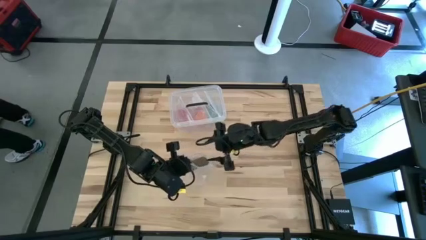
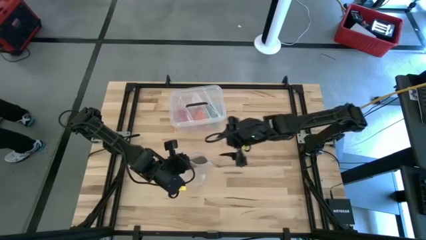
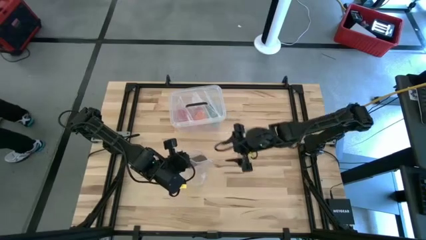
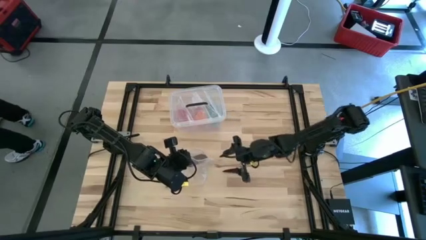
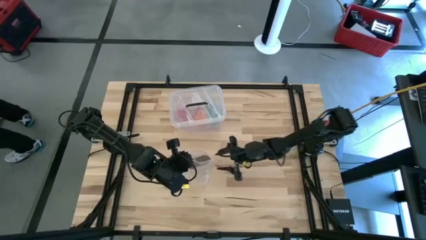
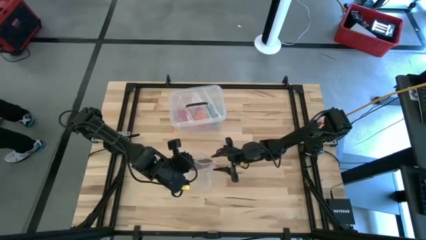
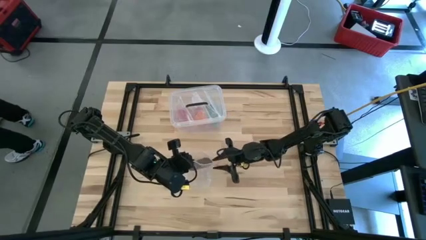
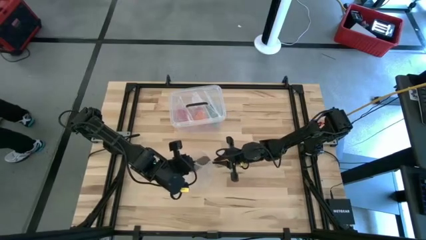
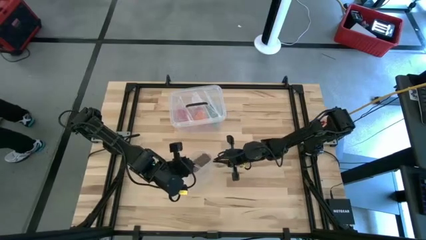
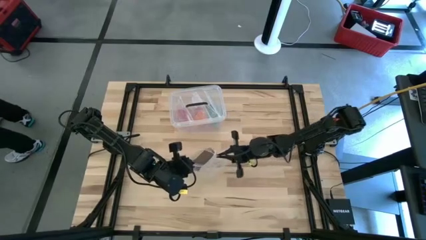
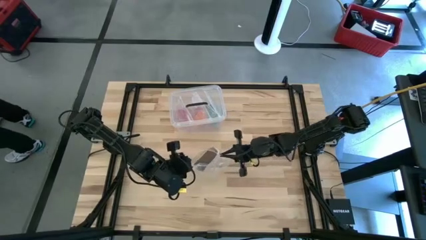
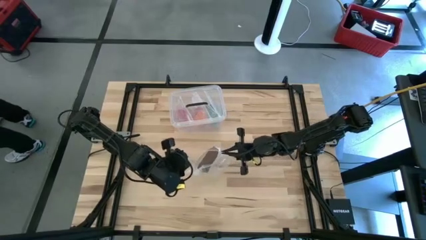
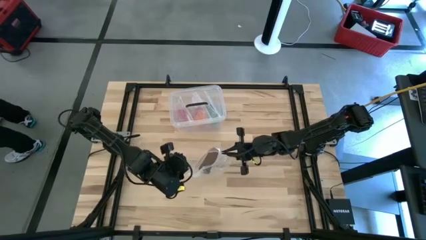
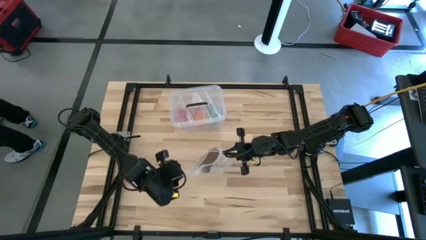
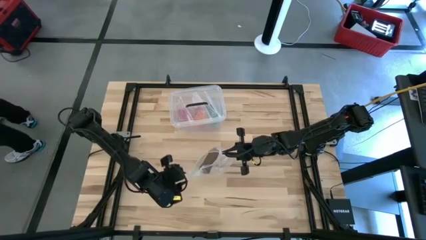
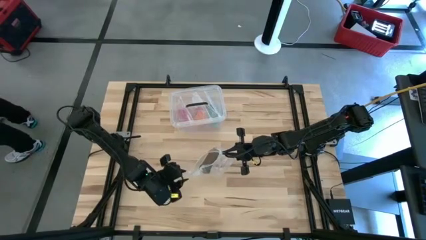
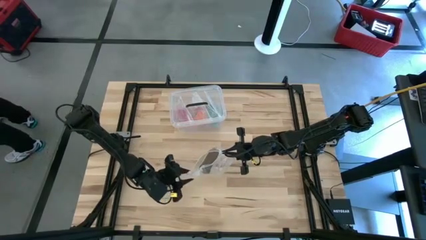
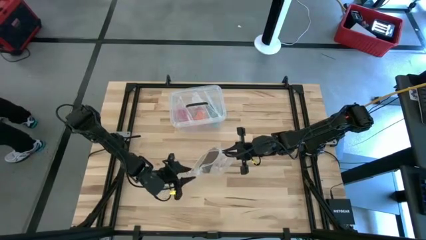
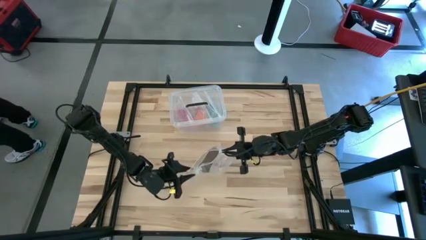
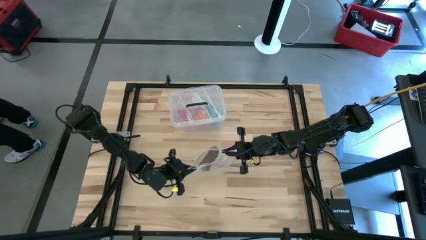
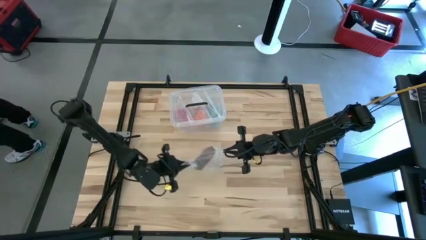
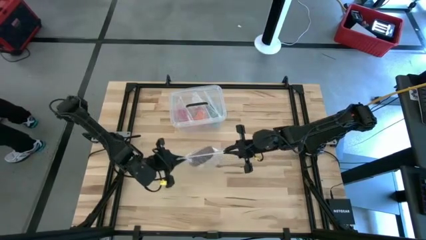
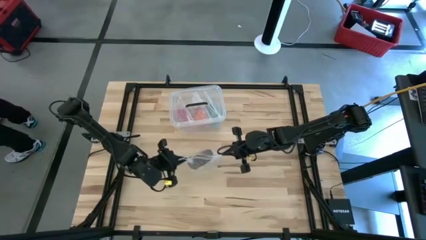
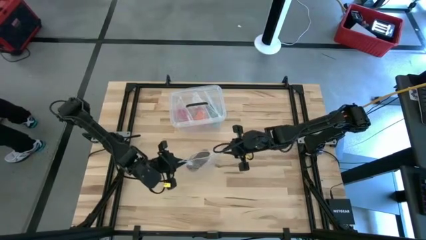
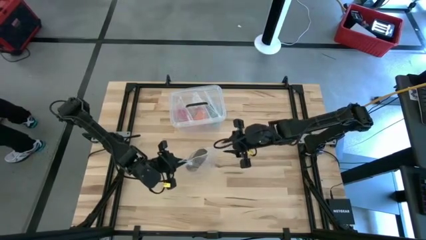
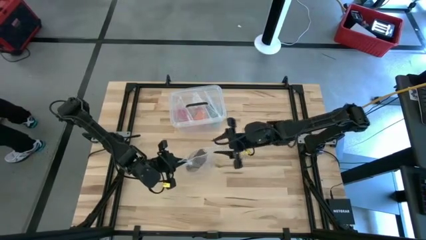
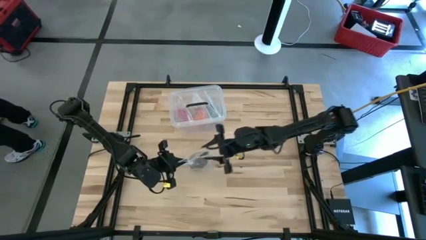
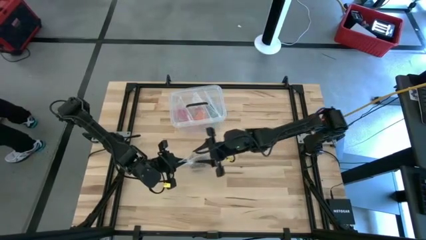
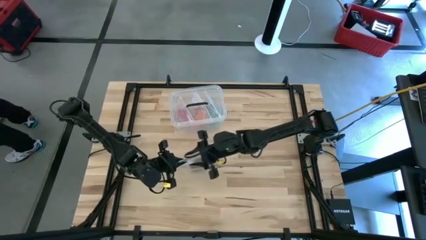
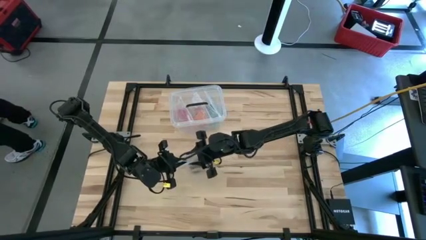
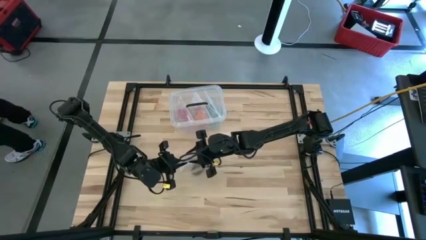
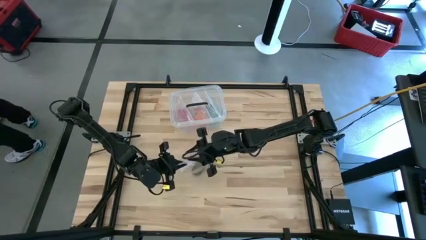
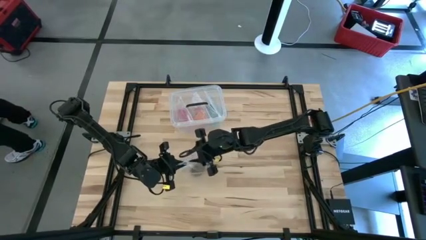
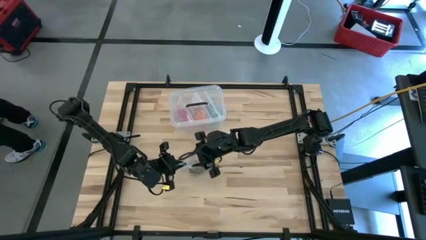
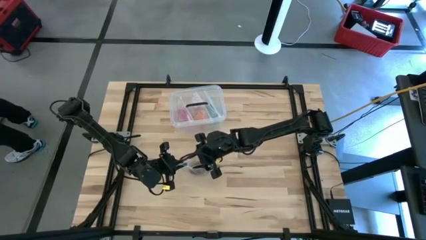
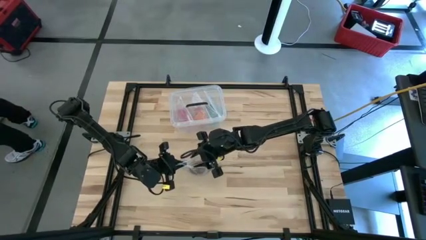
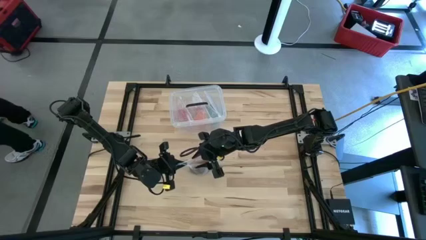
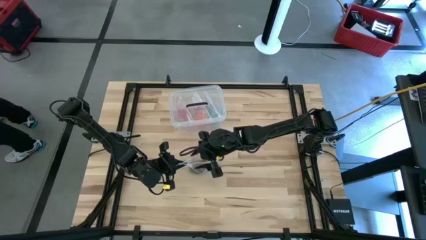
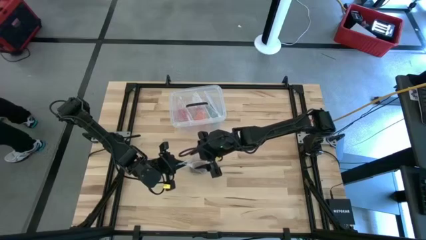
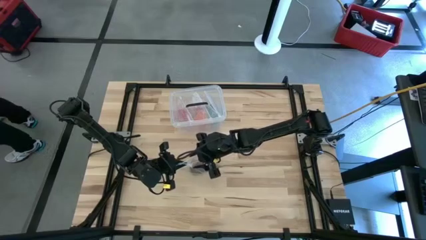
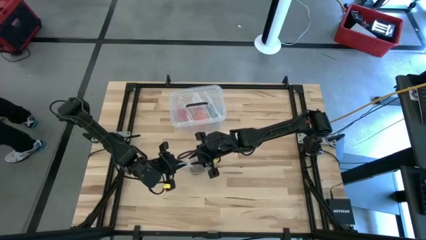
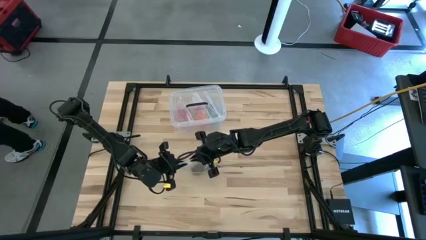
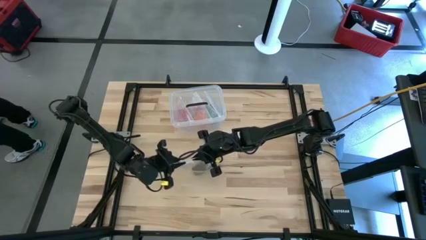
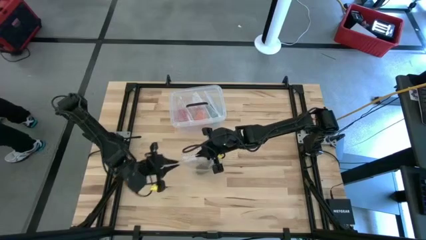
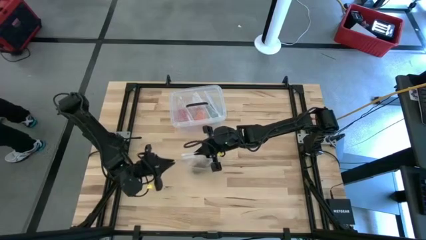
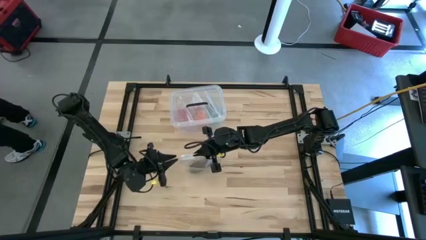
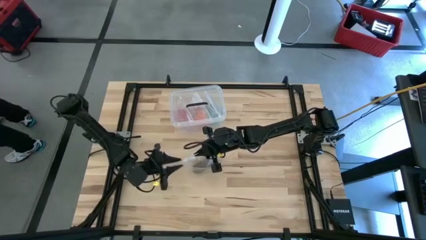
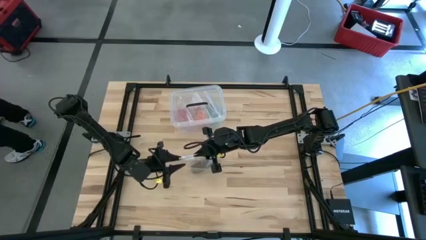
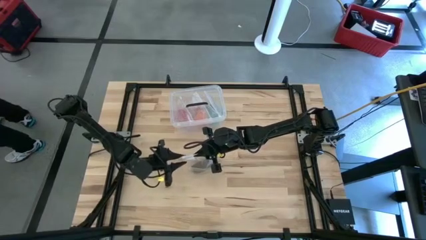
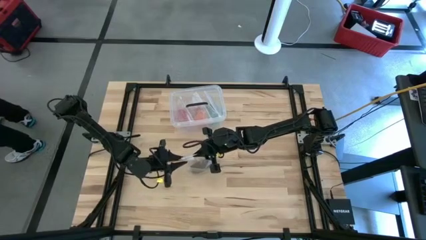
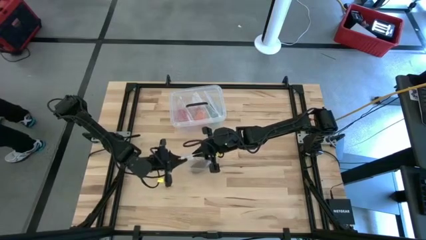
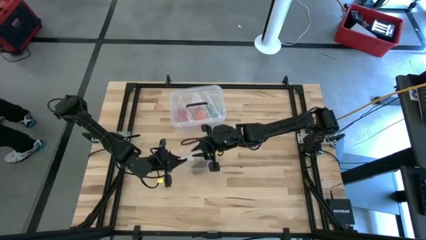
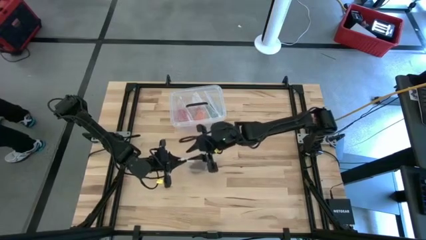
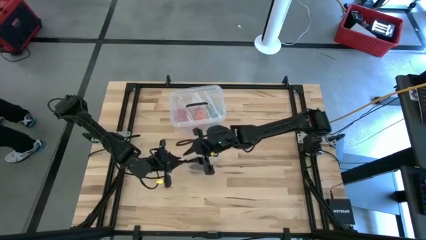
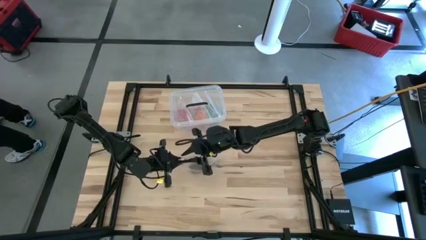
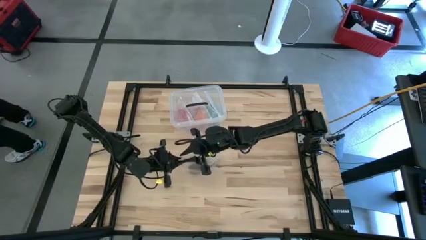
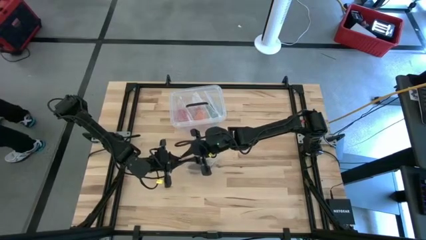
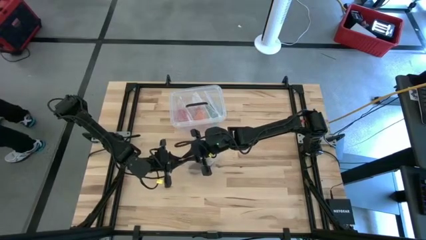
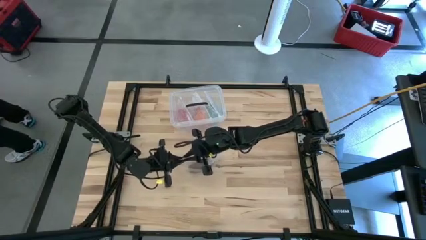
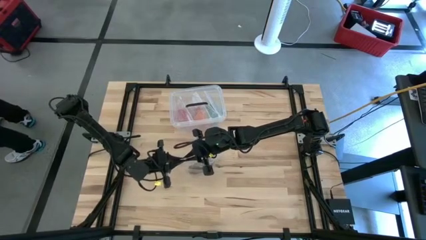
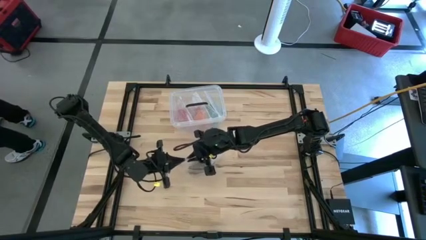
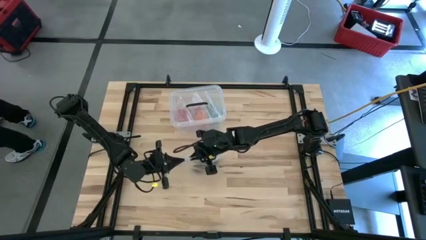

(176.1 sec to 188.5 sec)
Task: Roll bandage
Close the transparent zip bag

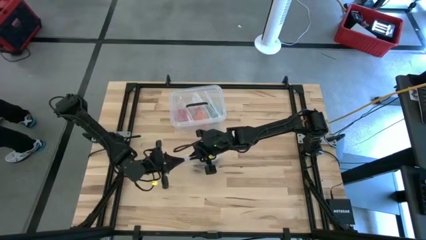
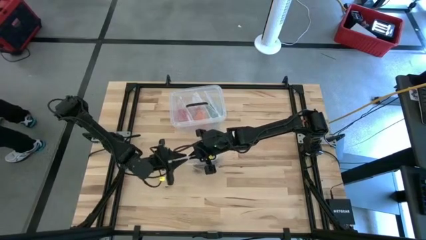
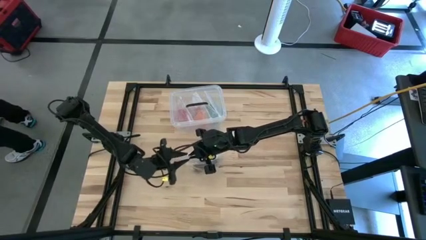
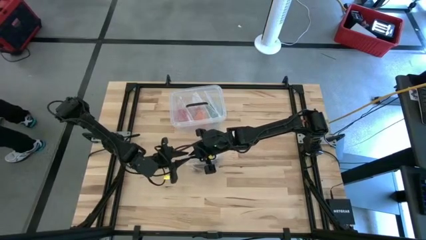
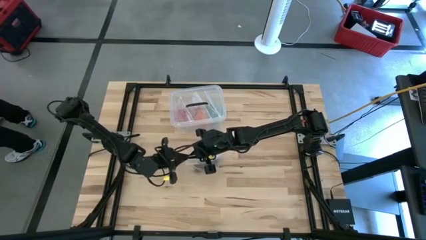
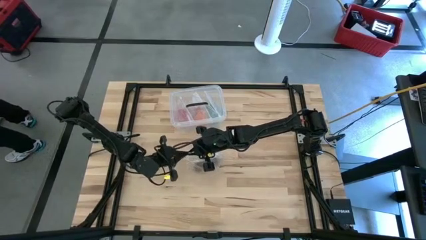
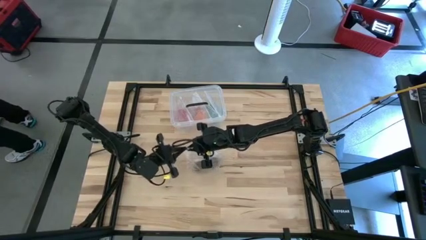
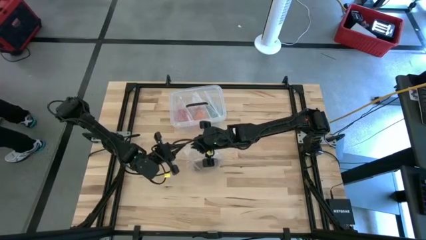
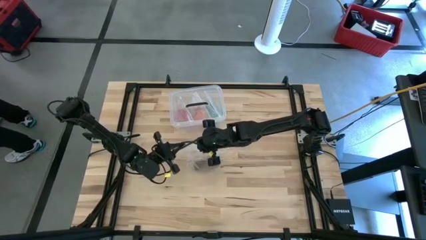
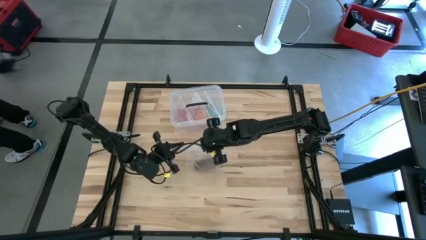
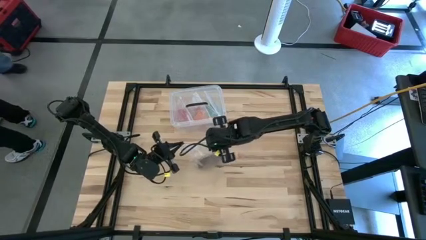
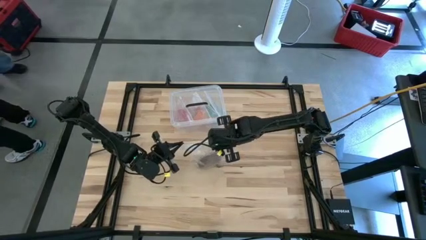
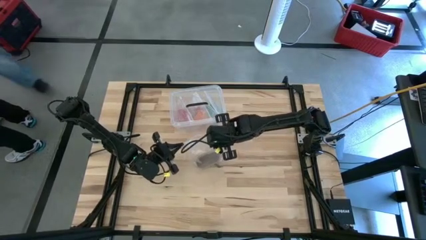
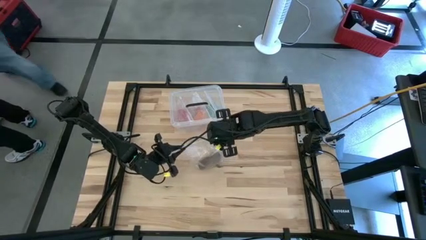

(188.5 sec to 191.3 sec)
Close the transparent zip bag

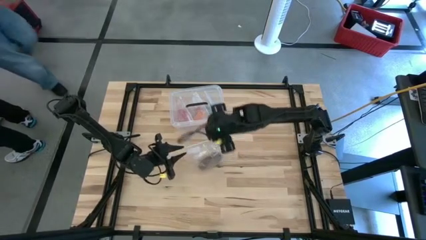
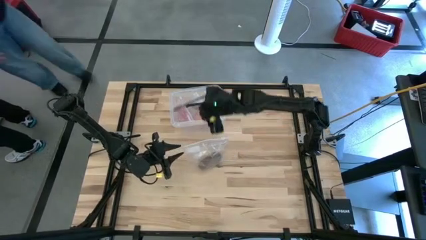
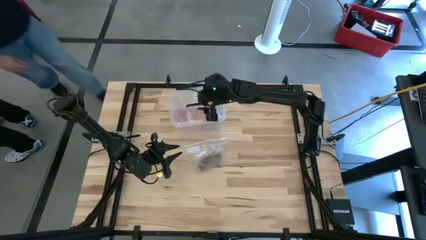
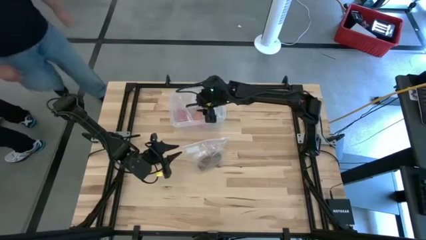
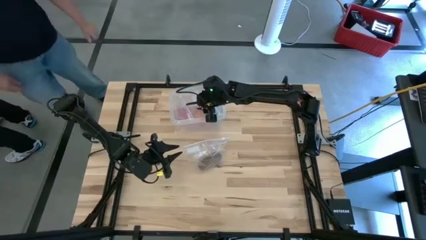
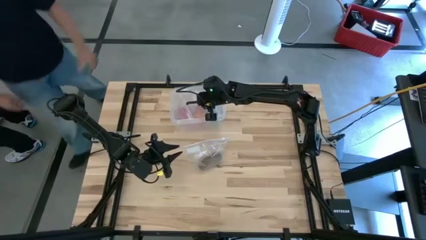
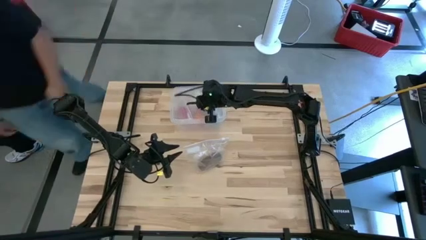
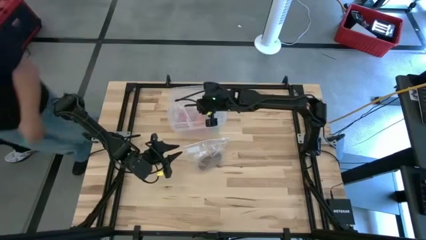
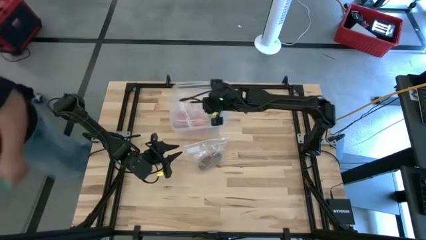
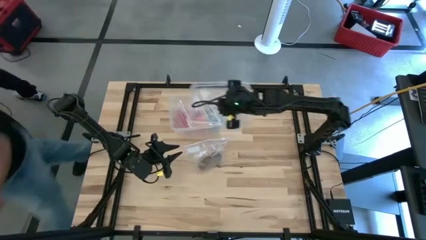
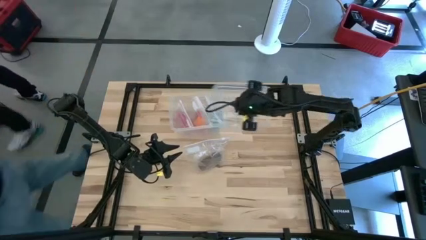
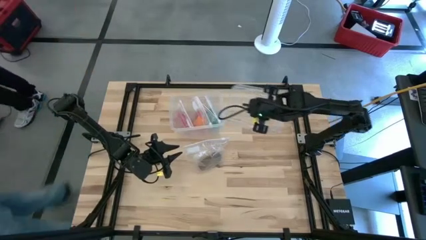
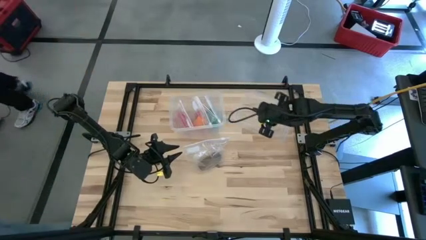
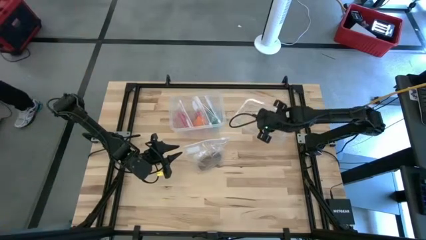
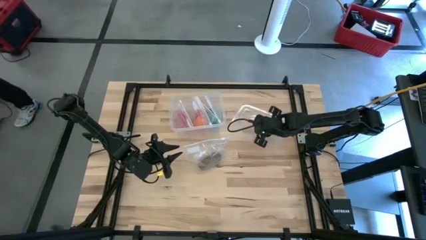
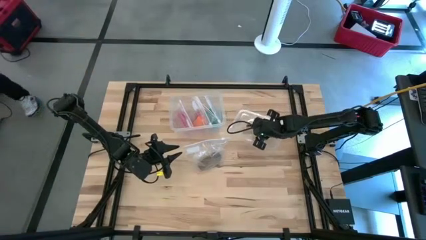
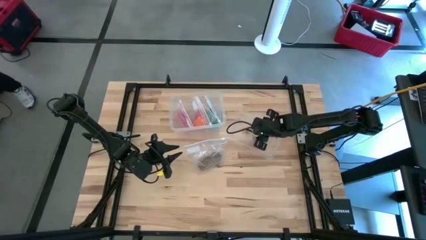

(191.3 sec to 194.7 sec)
Open the transparent container
